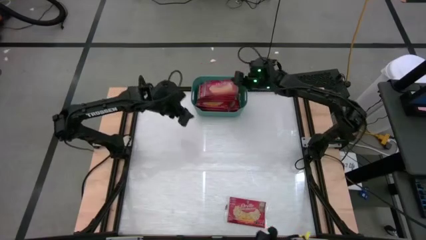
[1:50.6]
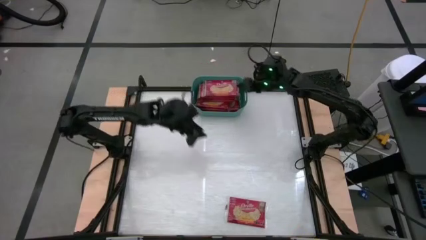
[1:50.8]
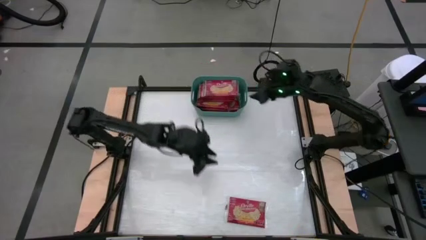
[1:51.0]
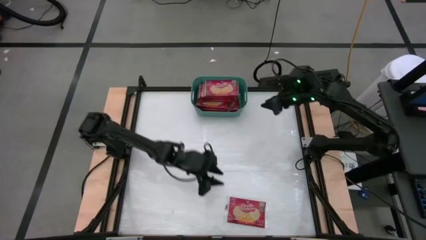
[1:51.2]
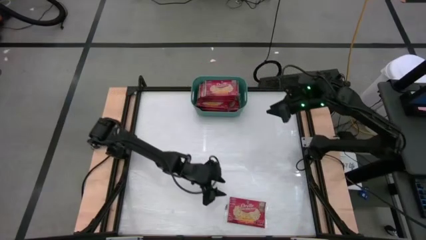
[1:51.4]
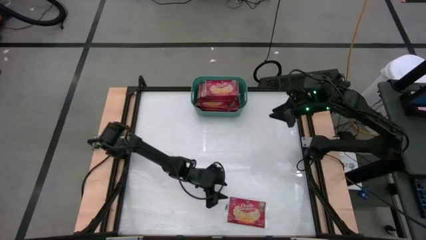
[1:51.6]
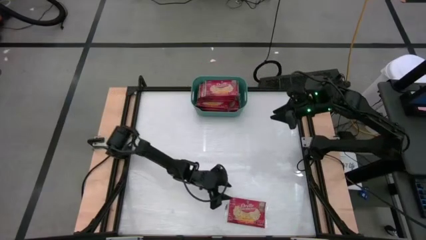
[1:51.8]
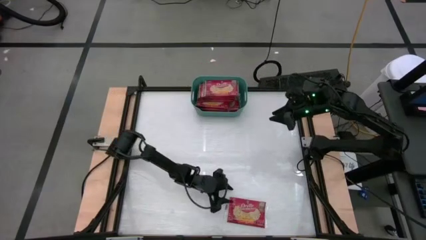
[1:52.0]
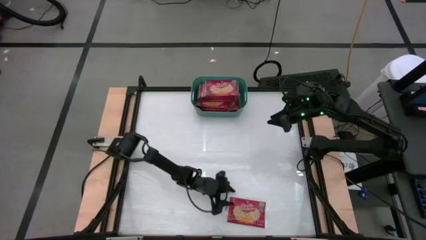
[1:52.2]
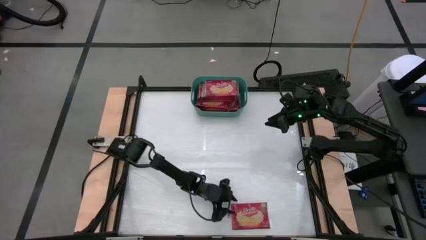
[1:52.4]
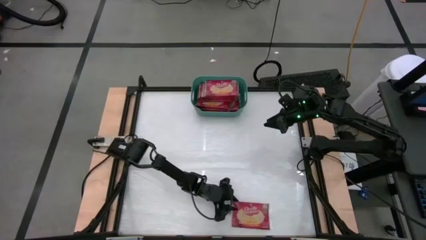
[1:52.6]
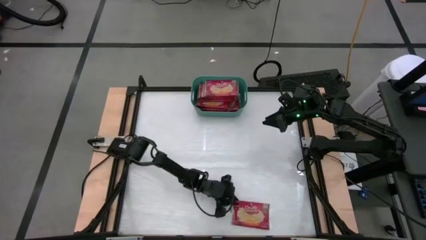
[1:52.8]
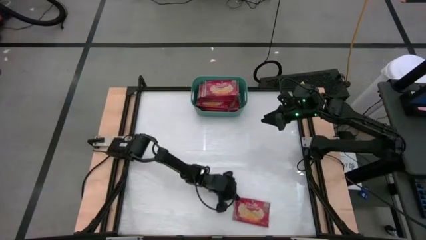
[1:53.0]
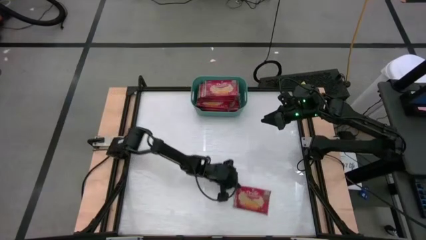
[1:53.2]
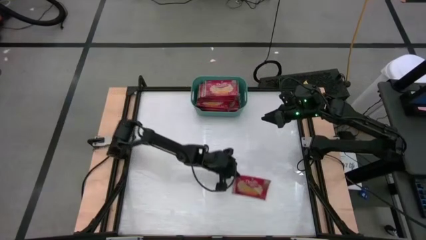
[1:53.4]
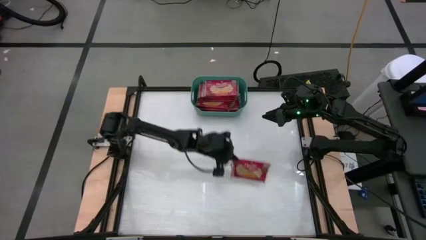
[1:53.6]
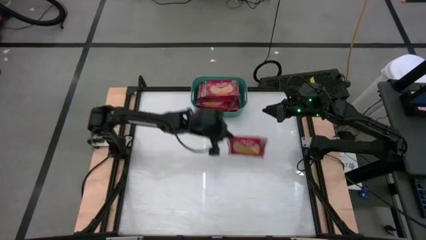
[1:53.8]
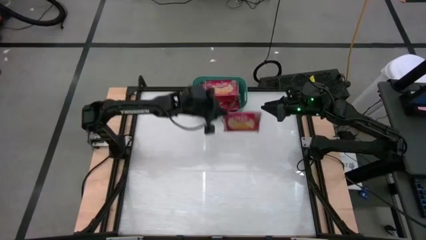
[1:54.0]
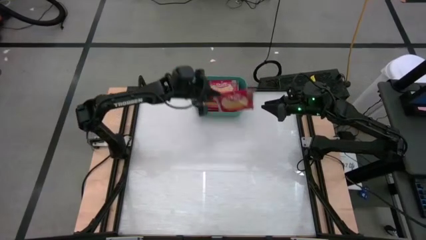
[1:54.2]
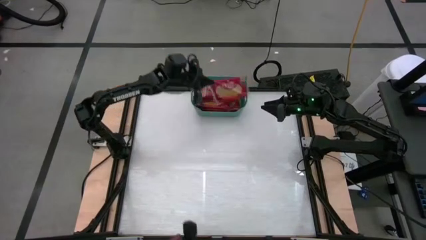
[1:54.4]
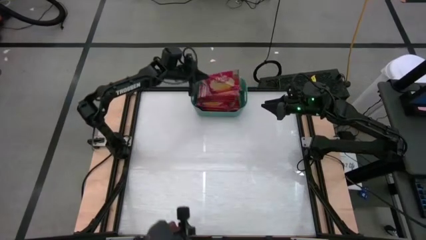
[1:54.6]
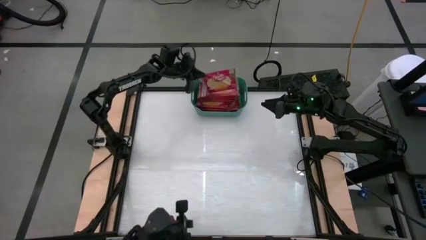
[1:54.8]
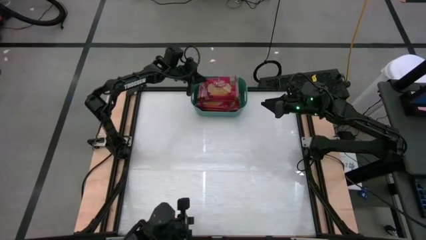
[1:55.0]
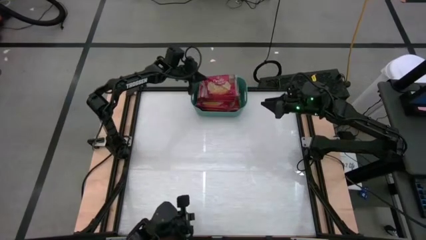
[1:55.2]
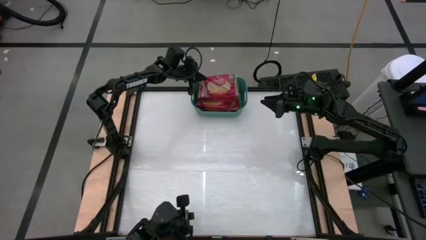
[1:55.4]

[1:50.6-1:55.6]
Task: Sort popcorn bags into baskets
Put the popcorn bag into the green bin

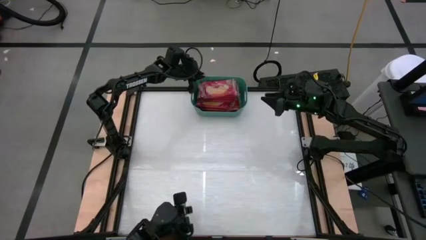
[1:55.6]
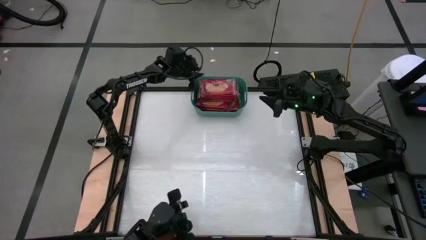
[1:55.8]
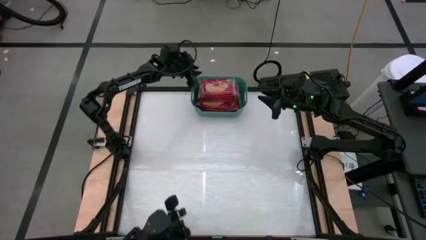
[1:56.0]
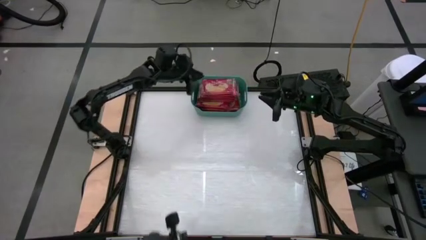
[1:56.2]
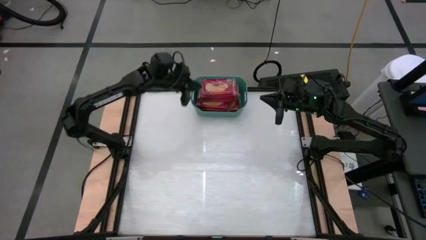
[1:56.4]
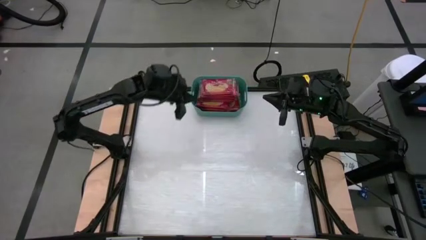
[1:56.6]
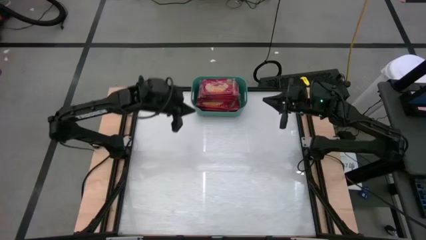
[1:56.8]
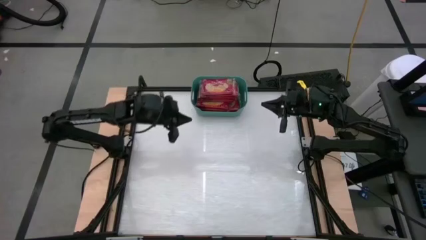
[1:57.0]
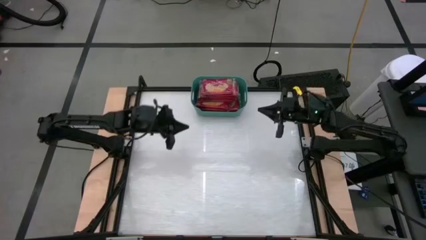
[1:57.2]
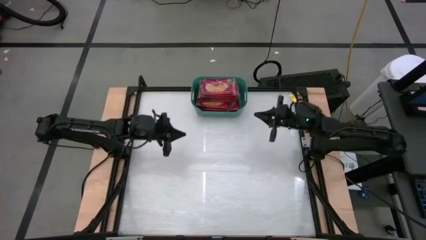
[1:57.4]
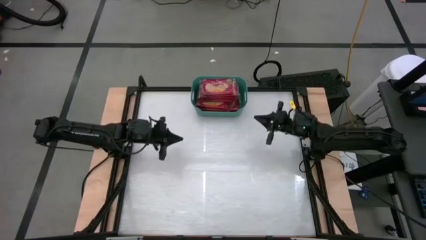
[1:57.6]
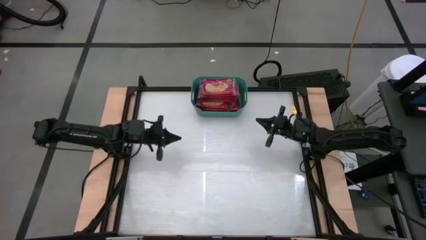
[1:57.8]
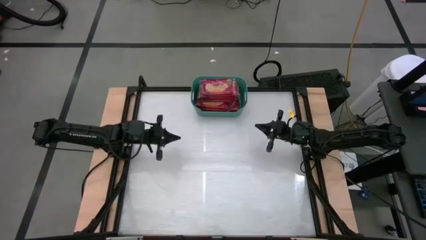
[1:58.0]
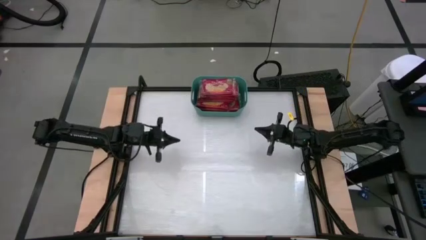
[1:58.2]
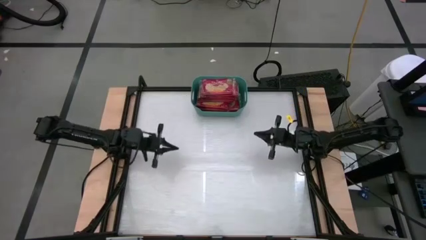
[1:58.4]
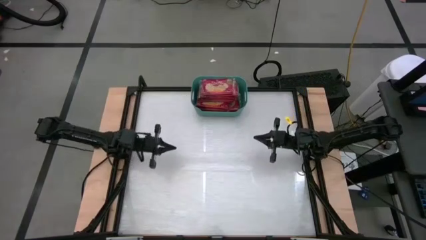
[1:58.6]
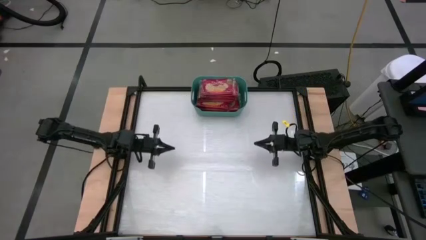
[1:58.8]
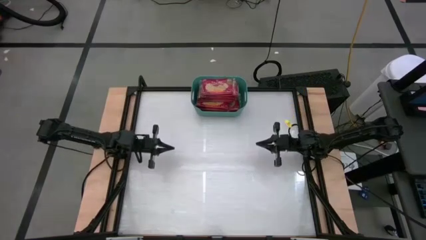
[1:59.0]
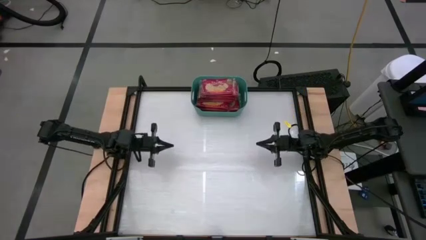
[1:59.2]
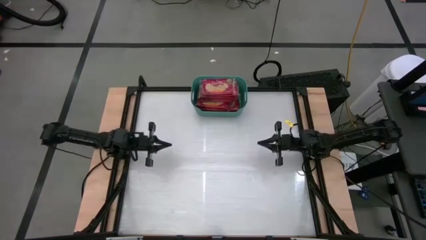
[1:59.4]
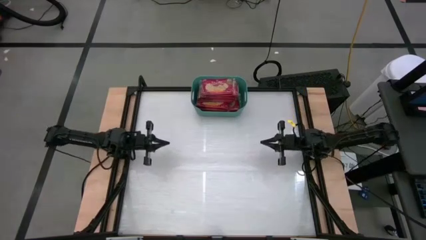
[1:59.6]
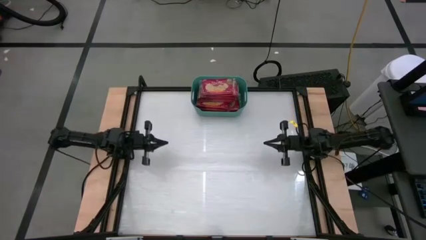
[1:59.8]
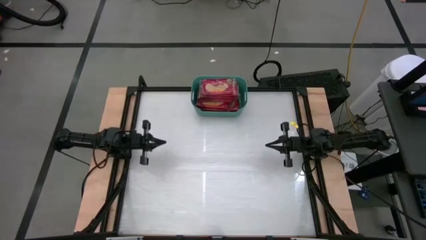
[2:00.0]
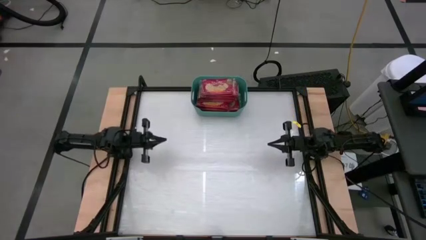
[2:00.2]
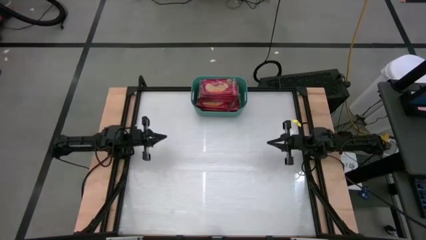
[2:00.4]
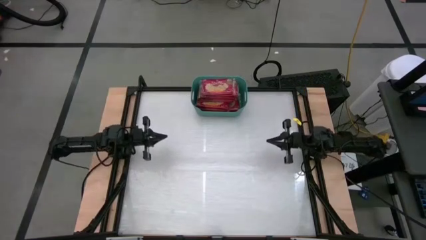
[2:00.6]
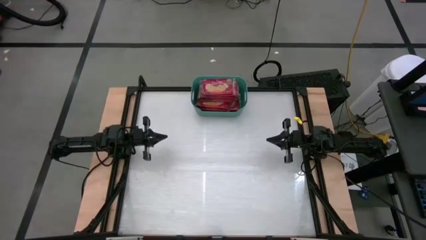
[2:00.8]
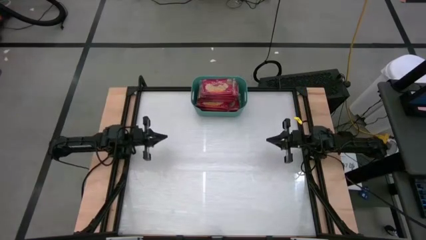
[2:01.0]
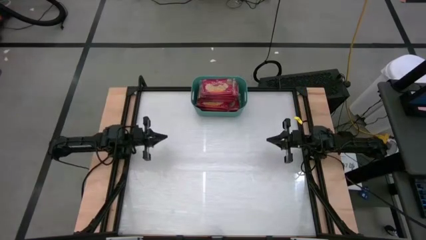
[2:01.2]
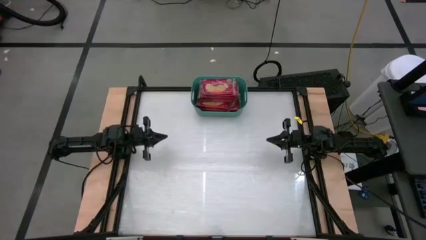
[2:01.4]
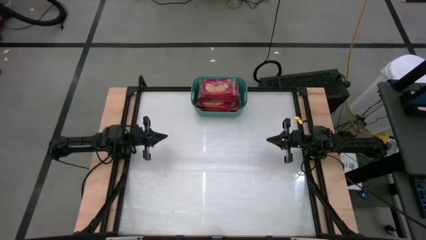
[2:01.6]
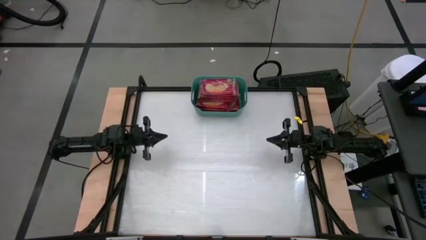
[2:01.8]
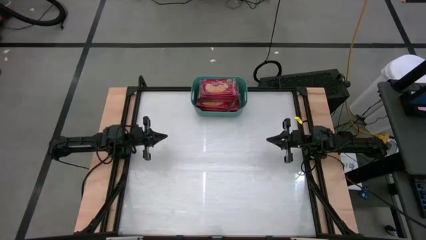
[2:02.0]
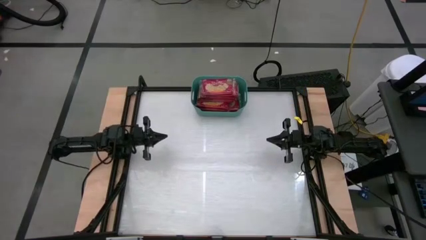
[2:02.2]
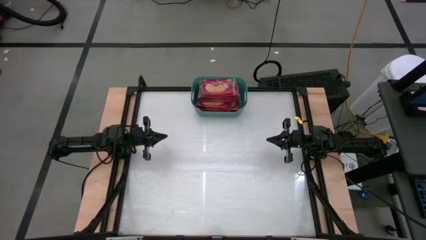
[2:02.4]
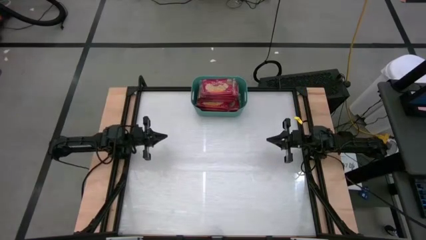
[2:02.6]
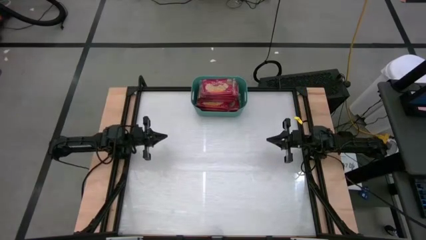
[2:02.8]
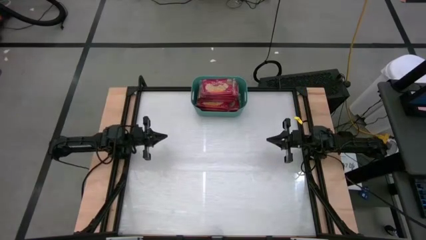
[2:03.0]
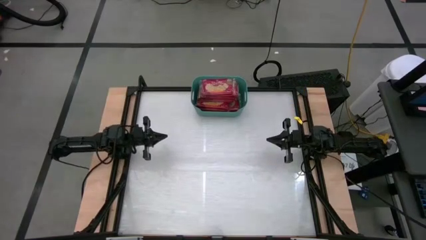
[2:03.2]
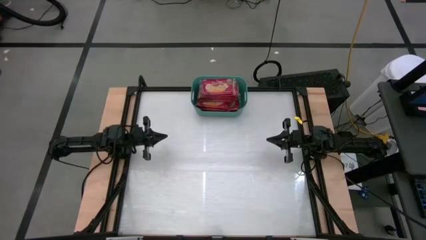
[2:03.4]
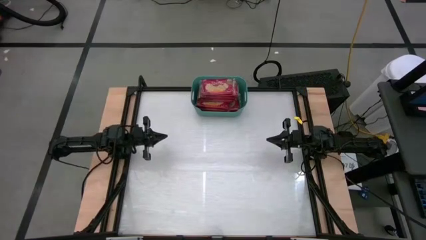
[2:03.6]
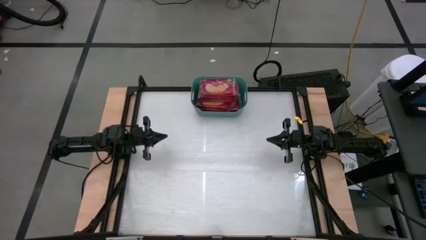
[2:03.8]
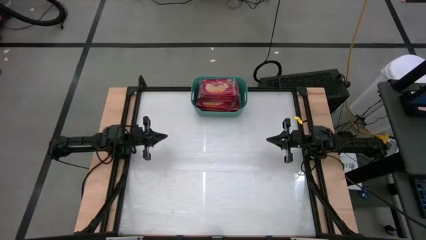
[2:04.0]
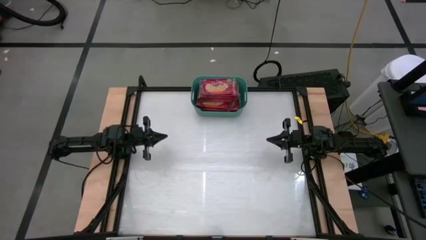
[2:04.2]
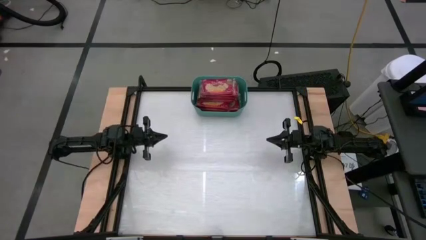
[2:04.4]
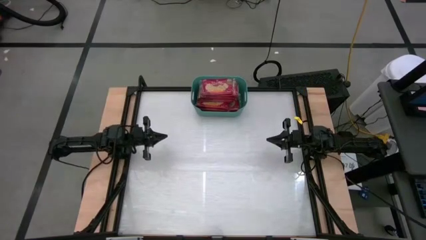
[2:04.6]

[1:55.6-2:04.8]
Return to Home Position

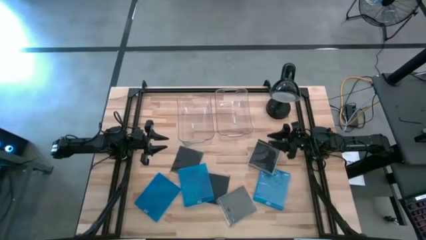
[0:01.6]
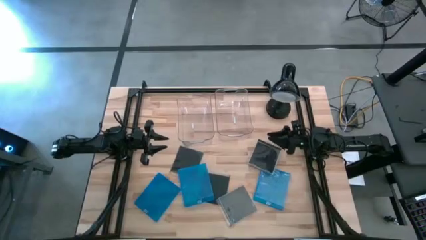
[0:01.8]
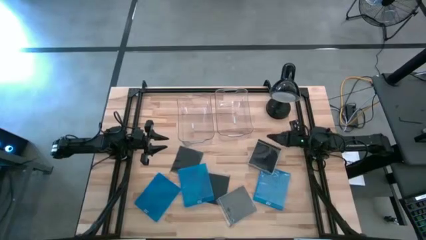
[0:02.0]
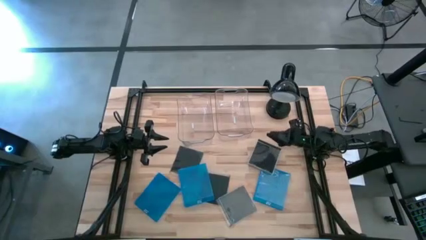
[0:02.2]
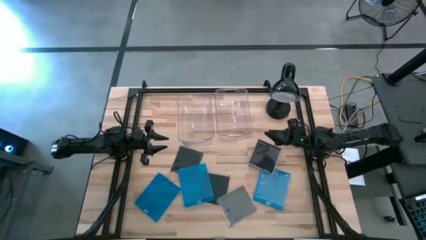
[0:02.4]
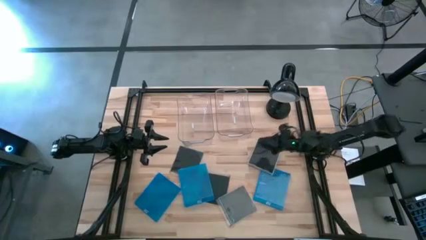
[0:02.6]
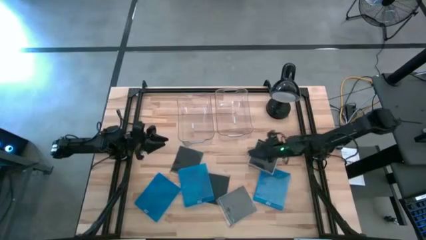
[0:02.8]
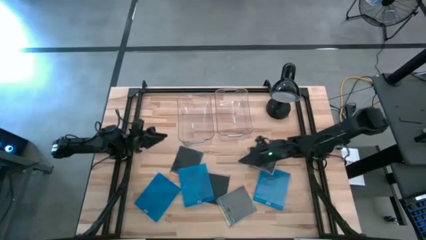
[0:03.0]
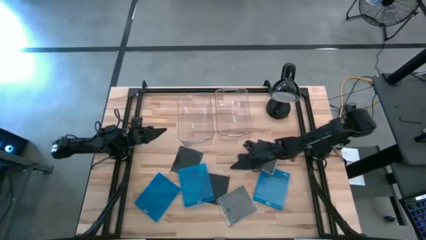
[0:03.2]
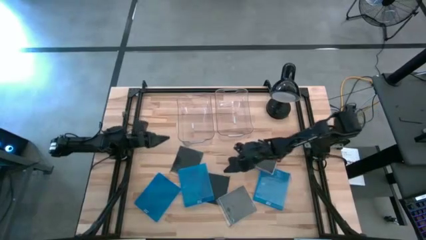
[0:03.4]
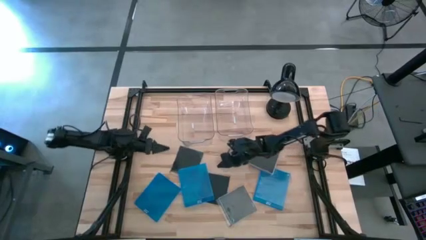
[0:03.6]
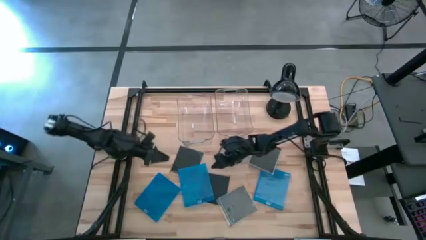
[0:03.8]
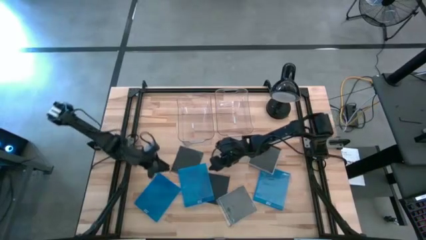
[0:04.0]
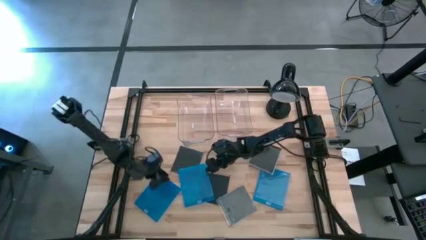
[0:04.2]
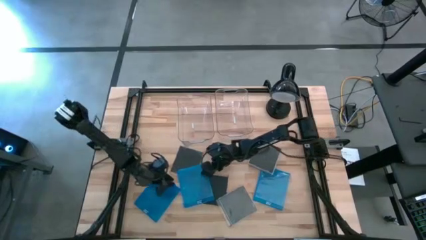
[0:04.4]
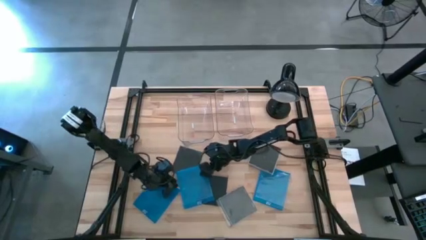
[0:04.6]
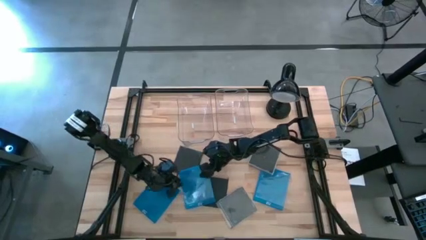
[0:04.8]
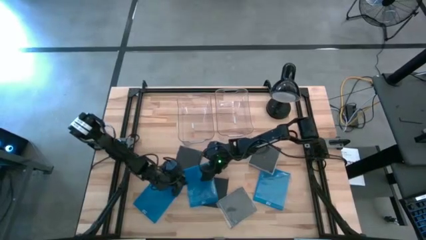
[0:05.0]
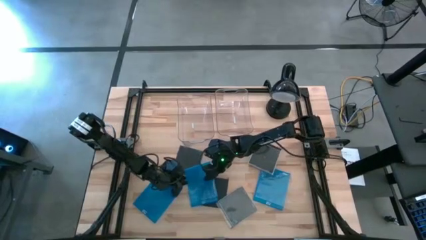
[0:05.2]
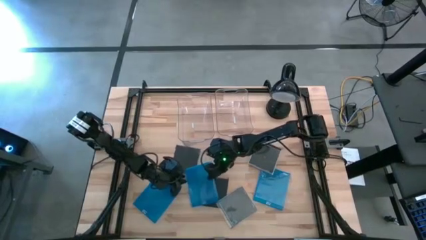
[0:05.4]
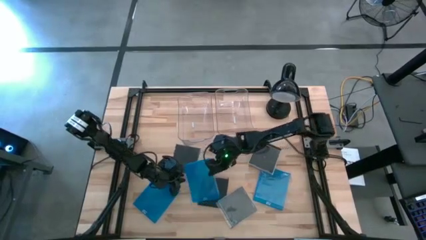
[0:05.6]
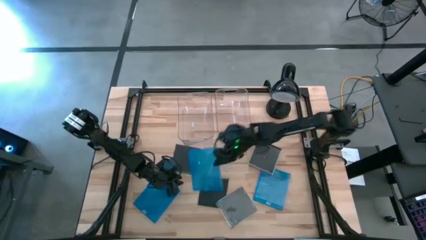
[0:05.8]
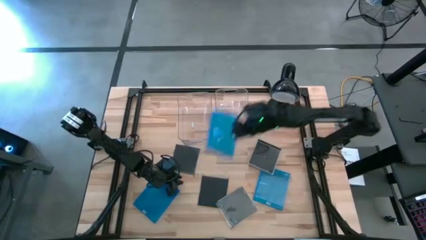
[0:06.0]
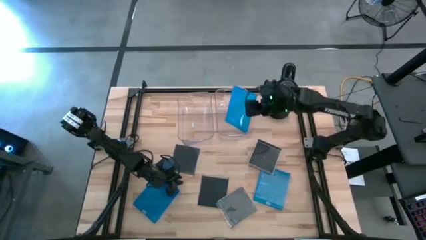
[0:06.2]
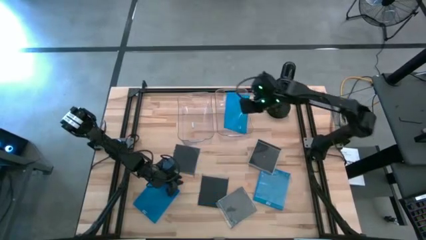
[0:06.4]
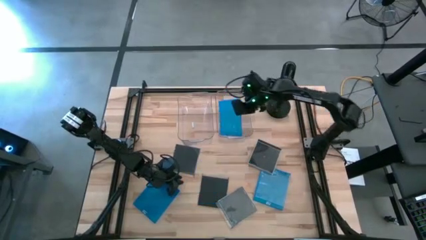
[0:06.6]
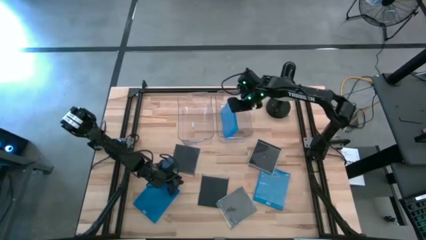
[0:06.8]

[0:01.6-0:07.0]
Task: Pick & place jewel cases by type
Put the middle blue CD case into the right transparent bin
